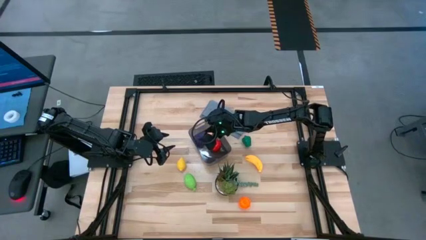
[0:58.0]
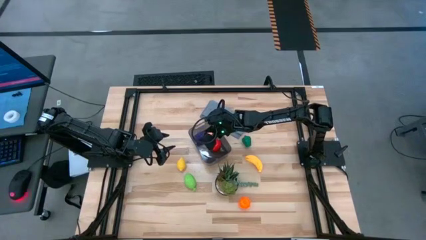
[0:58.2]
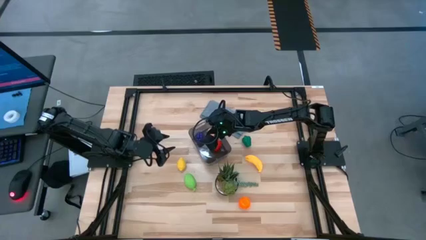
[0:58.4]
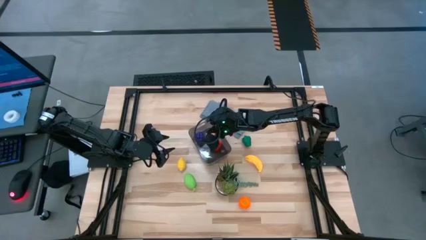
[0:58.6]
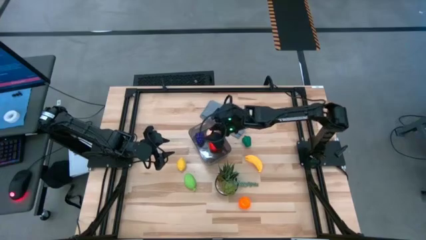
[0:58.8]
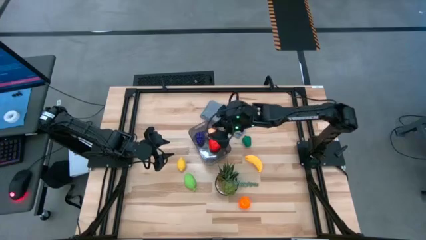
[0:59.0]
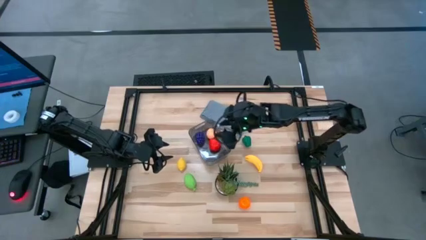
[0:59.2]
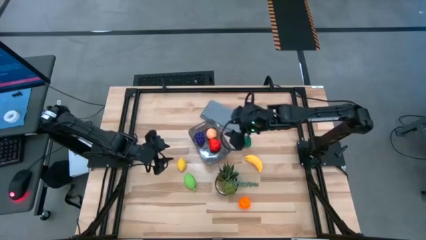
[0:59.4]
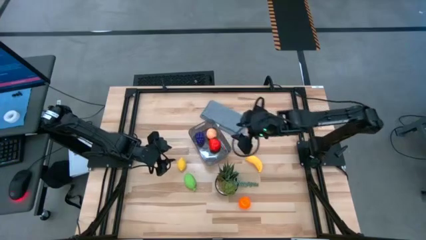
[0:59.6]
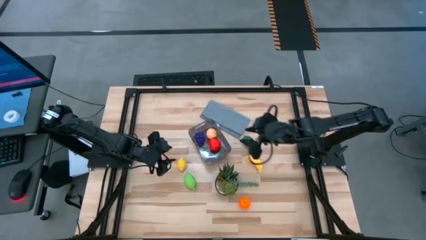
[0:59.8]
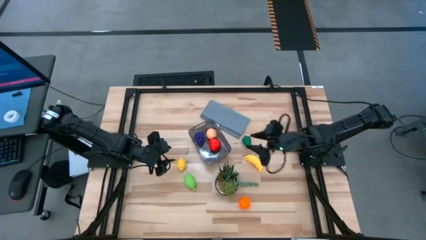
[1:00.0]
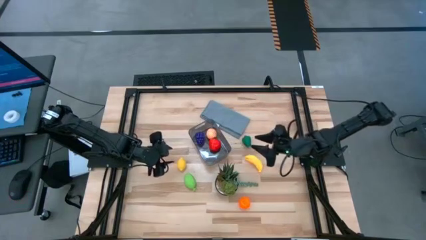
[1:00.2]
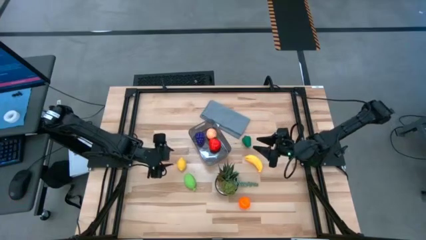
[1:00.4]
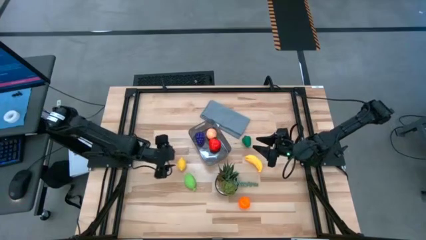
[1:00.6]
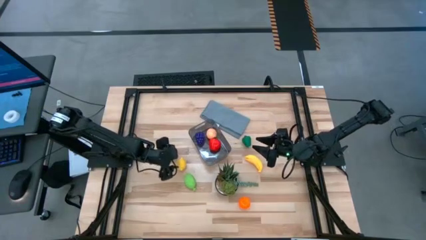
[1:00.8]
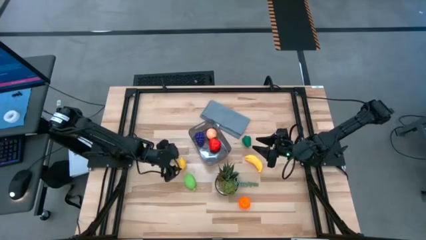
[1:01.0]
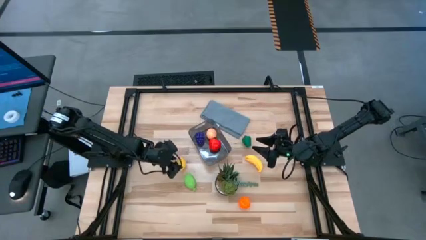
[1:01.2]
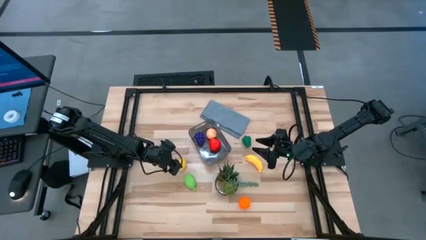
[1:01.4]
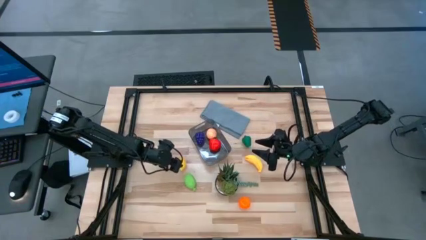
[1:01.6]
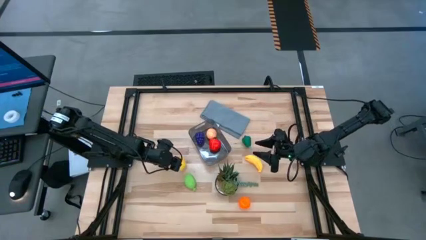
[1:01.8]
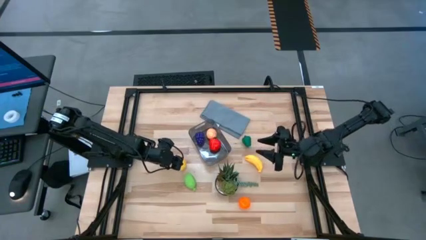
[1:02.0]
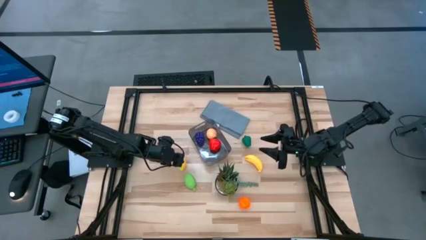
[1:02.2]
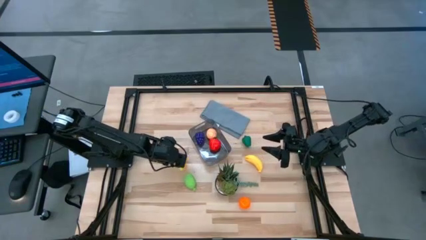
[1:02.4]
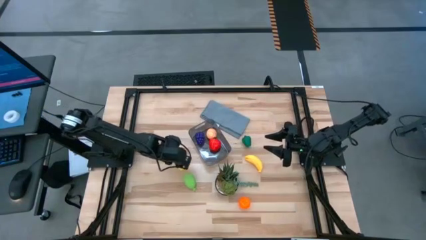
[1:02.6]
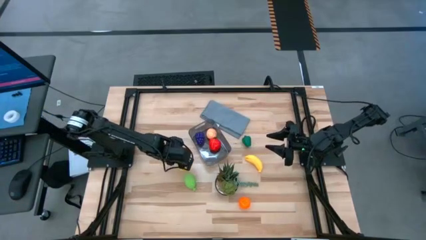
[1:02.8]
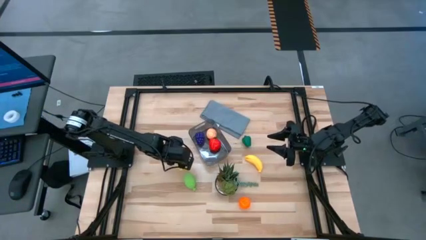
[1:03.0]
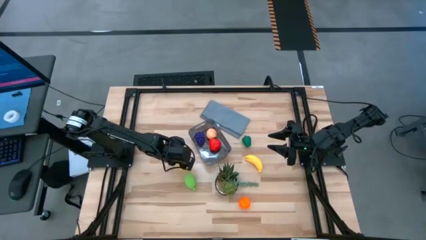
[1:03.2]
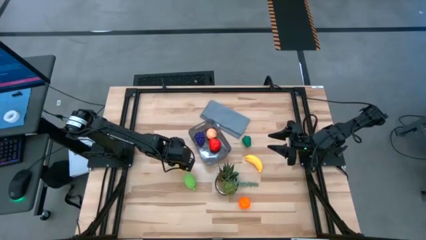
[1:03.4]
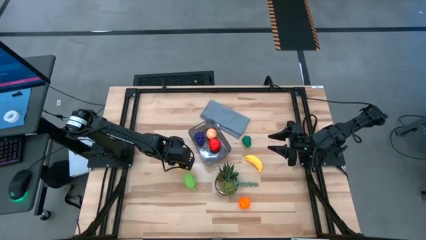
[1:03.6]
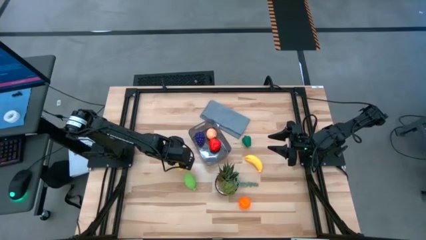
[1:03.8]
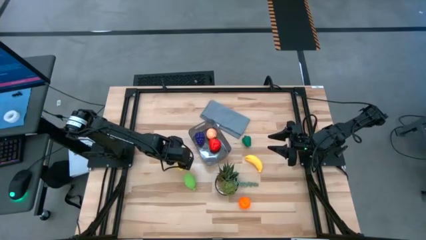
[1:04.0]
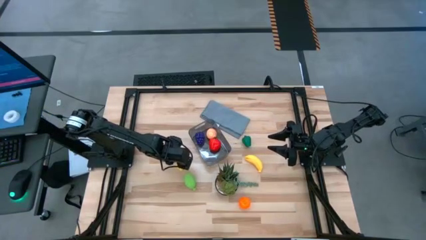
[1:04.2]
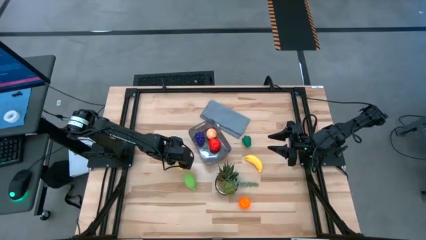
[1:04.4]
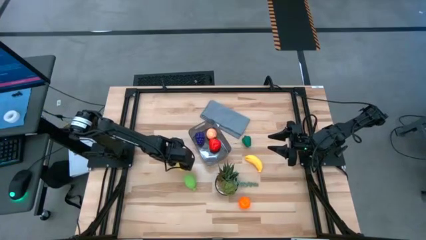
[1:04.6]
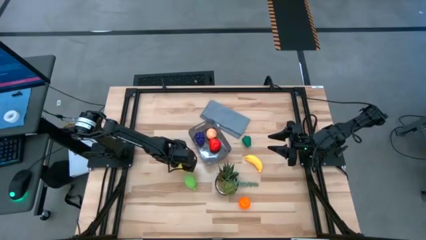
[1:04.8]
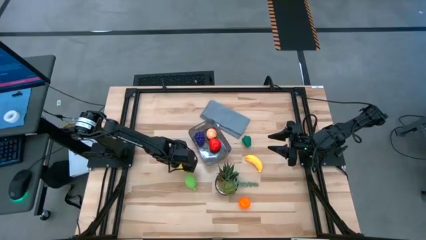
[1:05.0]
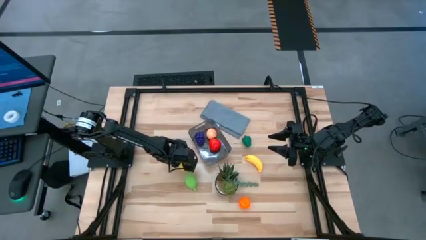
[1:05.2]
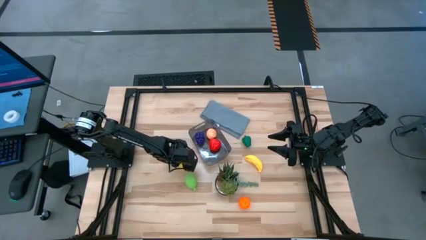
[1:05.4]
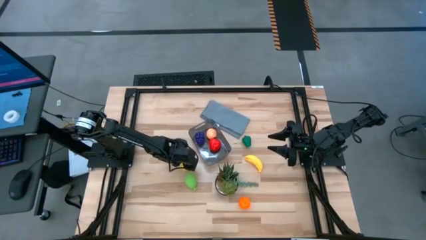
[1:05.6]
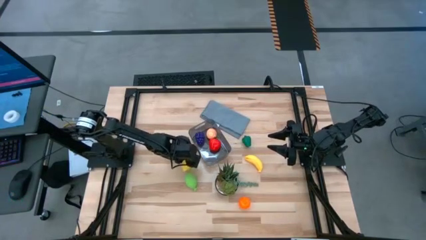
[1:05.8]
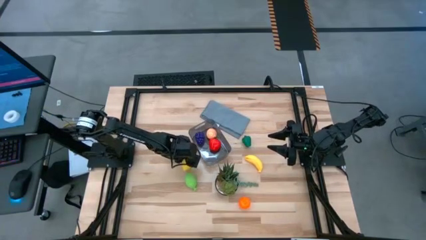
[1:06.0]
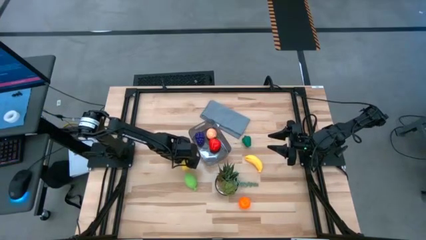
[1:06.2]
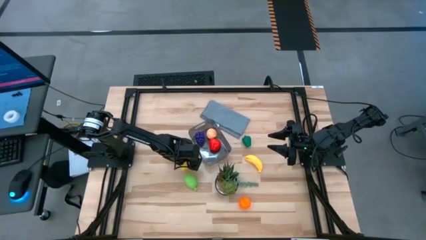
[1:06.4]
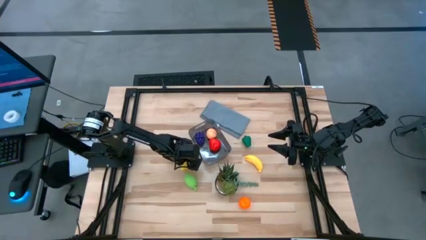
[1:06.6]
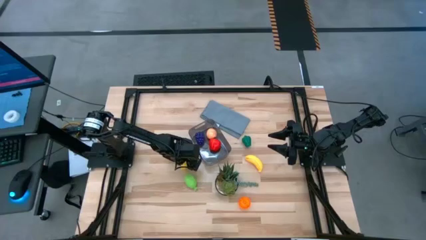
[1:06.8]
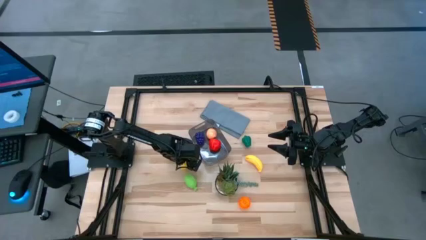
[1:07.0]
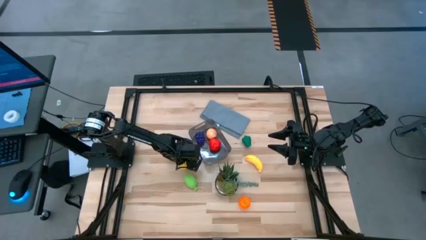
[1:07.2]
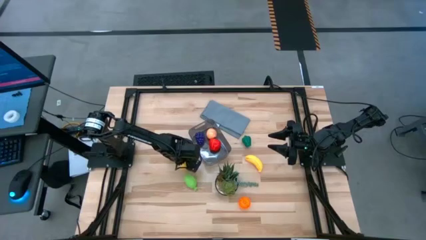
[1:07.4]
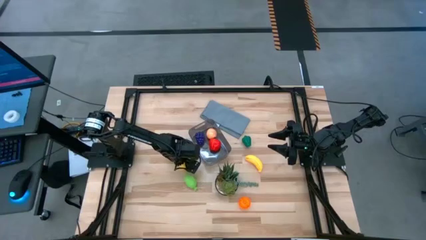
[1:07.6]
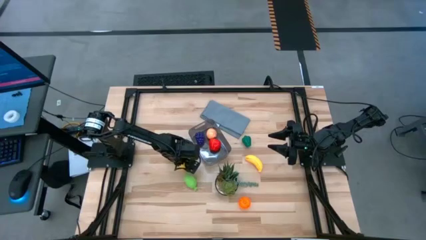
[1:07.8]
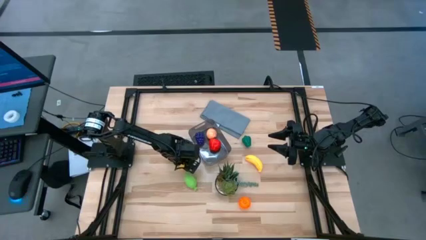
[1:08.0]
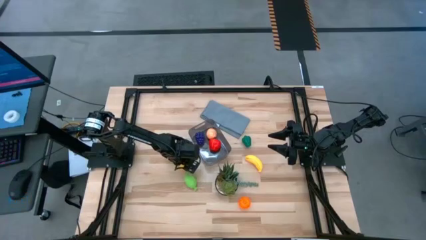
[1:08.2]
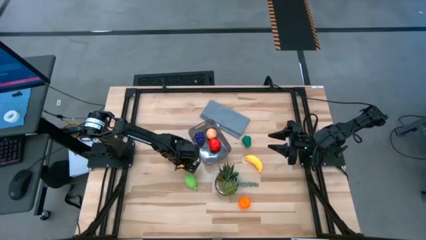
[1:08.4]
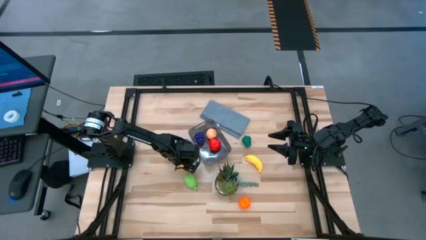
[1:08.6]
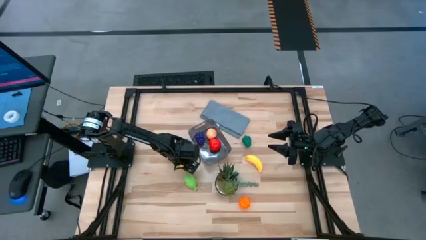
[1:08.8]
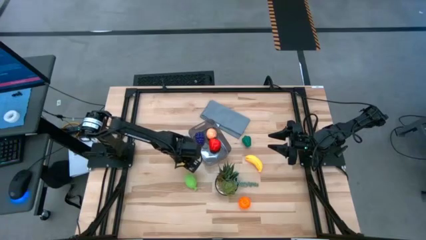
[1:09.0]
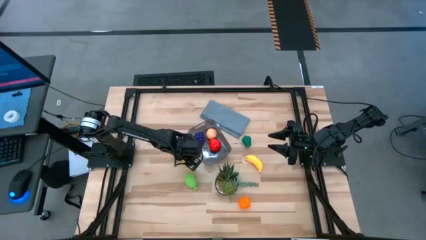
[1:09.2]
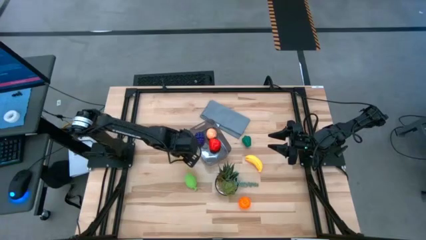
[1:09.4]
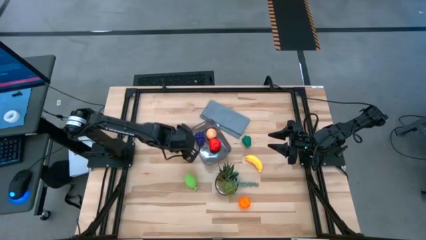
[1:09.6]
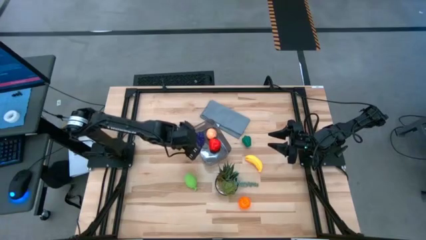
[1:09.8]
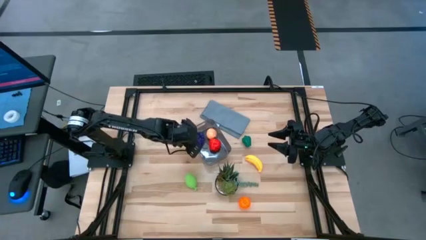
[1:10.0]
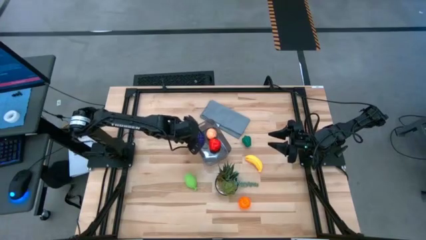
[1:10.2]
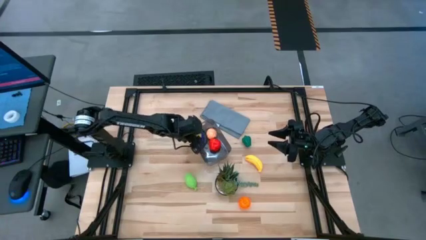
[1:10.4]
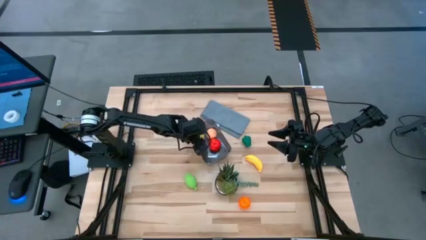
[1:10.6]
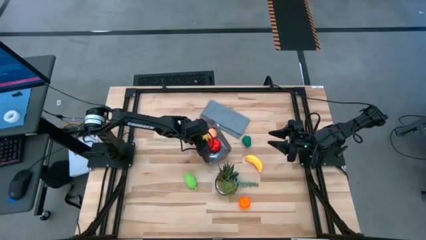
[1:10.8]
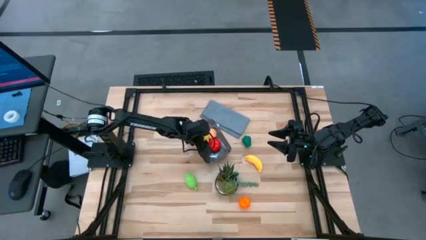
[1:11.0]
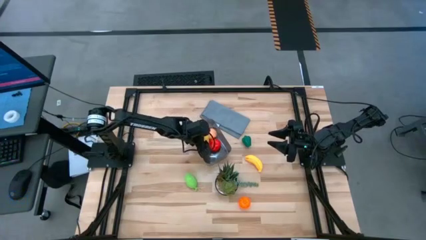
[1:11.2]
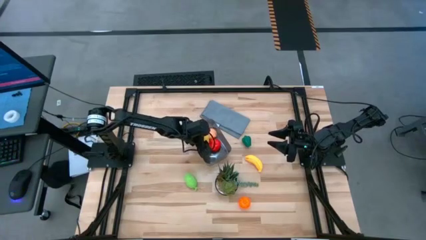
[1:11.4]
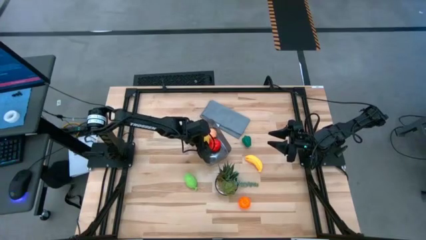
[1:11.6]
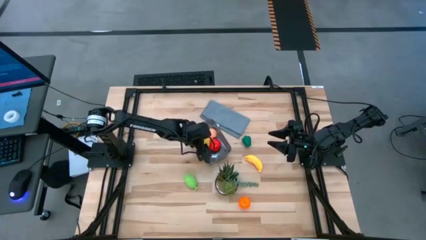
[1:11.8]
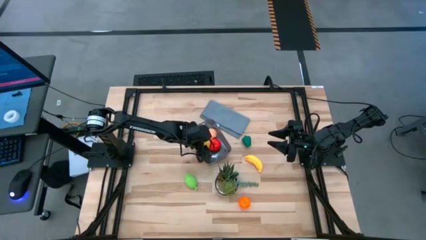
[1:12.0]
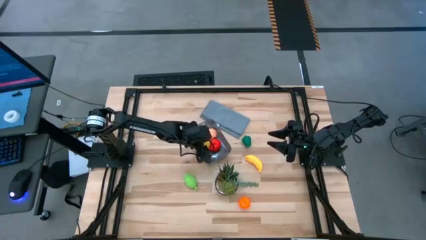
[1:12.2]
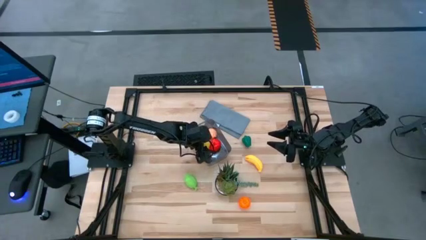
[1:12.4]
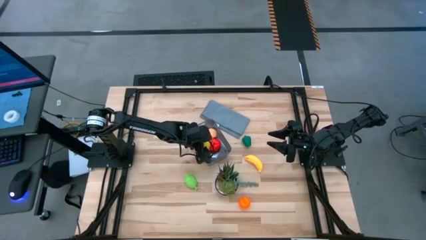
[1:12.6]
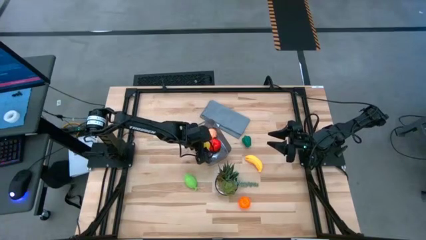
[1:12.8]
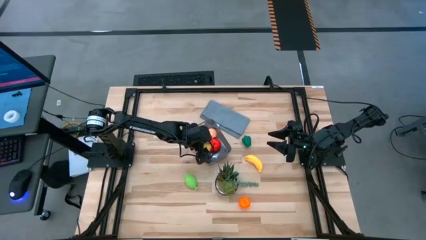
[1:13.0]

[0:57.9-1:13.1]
Task: Pick and placing Produce into tupperware
Put the yellow lemon into the black bin

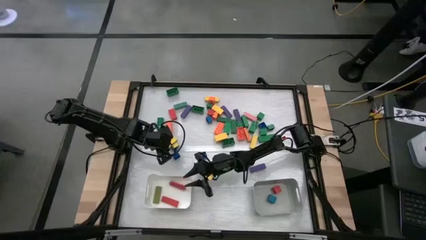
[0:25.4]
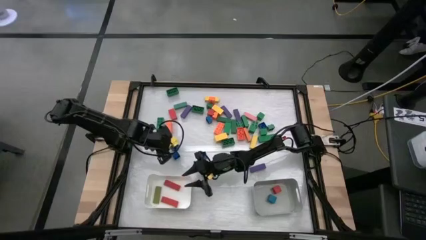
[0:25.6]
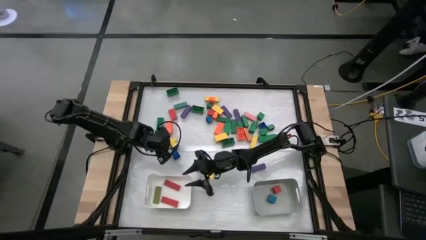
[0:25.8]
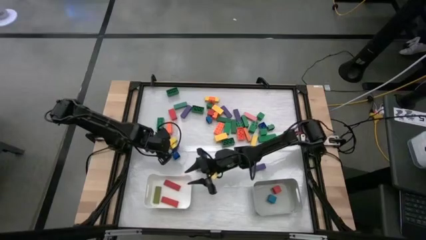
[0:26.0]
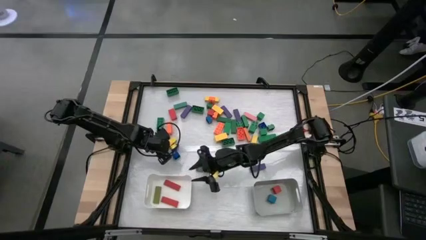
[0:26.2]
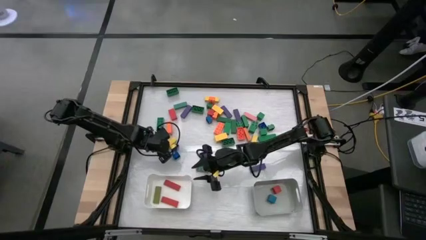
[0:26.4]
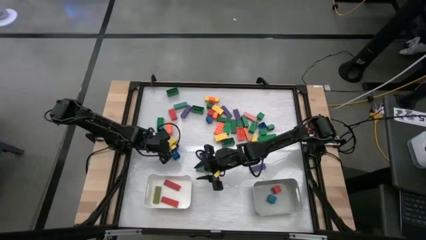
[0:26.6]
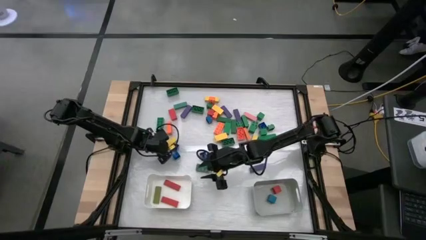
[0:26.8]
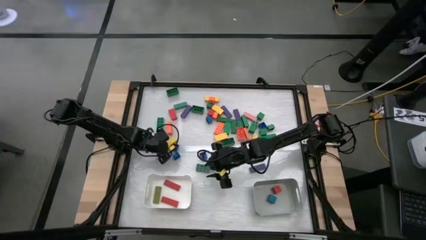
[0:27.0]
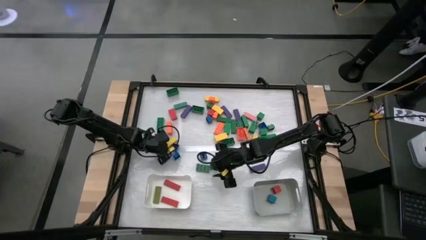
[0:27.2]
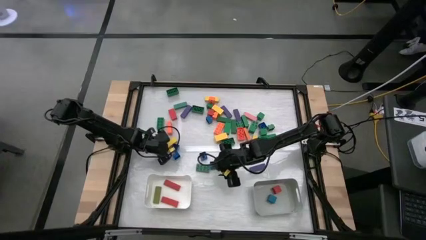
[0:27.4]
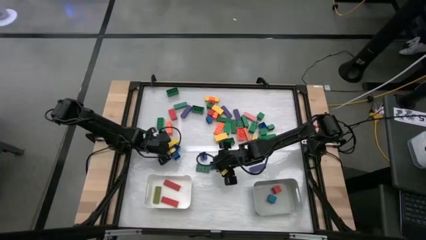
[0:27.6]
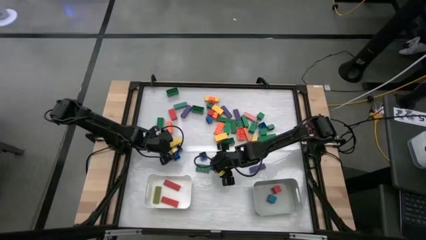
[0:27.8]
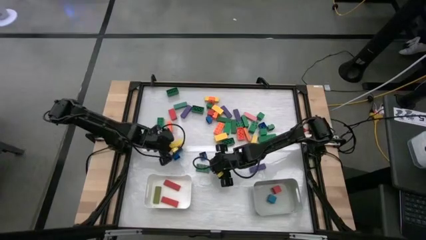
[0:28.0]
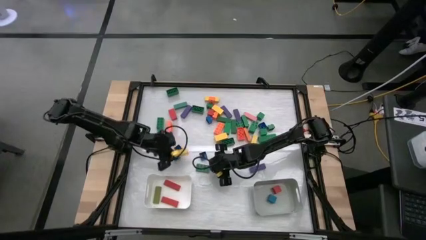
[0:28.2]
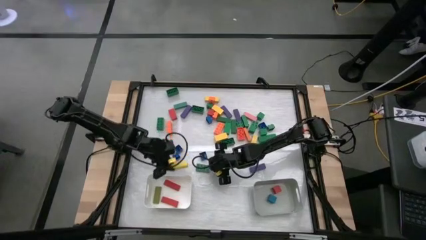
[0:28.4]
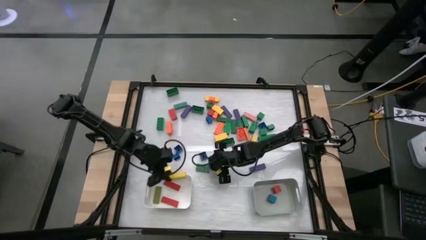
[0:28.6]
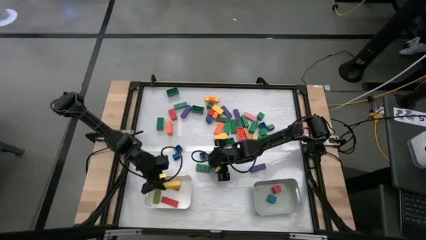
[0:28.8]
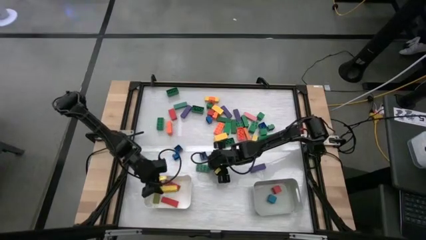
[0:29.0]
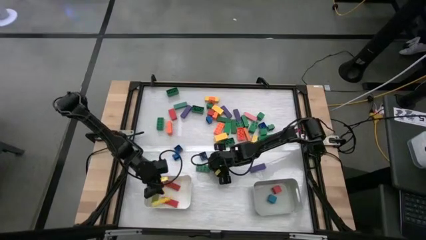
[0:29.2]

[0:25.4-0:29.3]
Task: Sort blocks by size
Put the rectangular yellow block into the white bin
